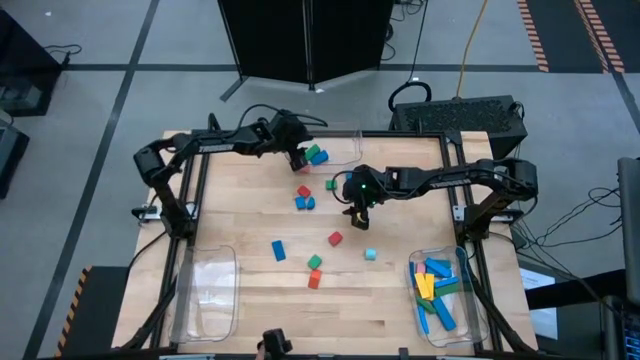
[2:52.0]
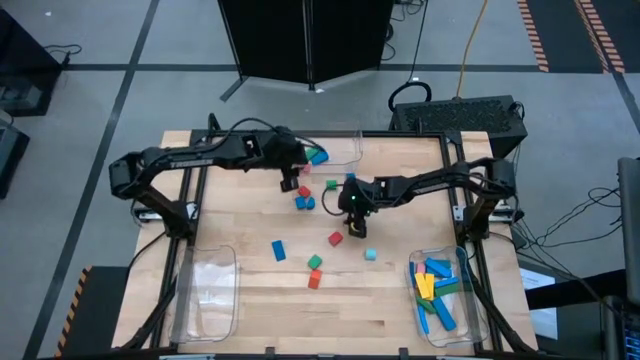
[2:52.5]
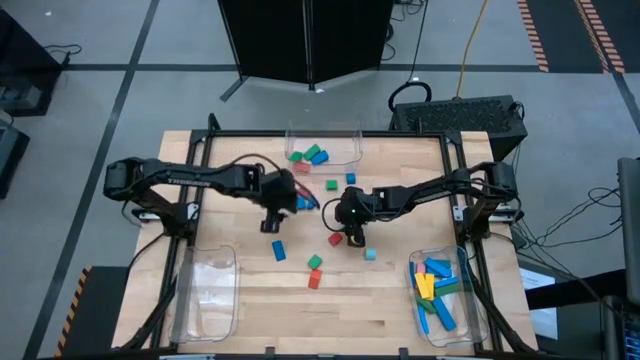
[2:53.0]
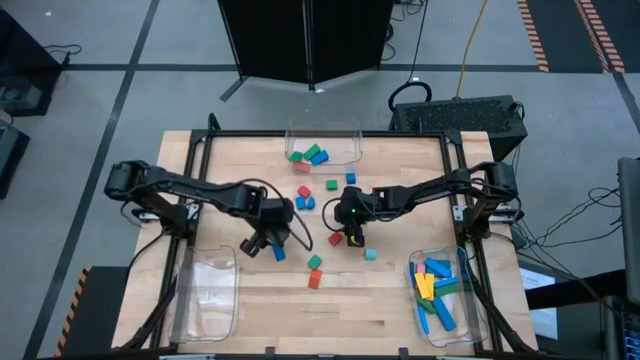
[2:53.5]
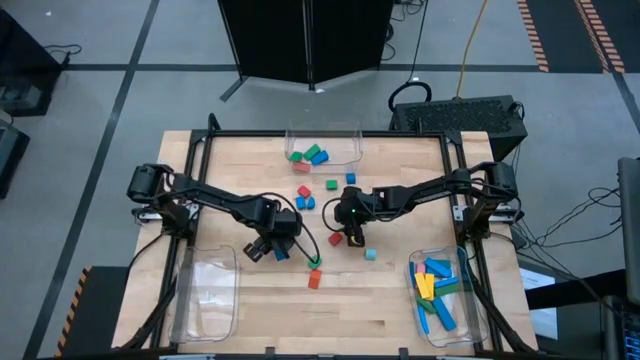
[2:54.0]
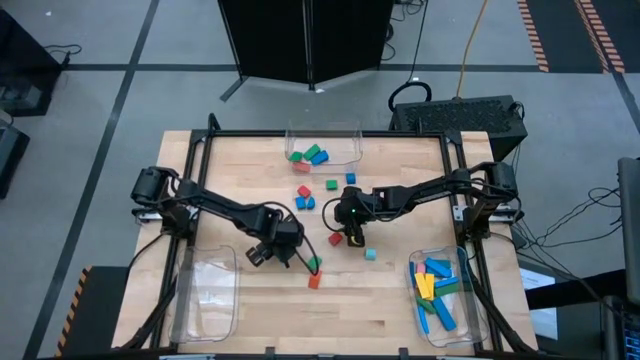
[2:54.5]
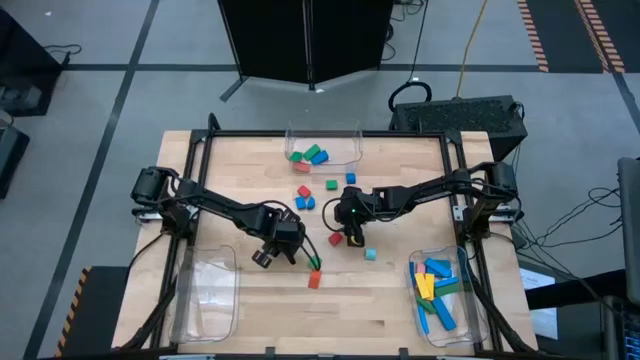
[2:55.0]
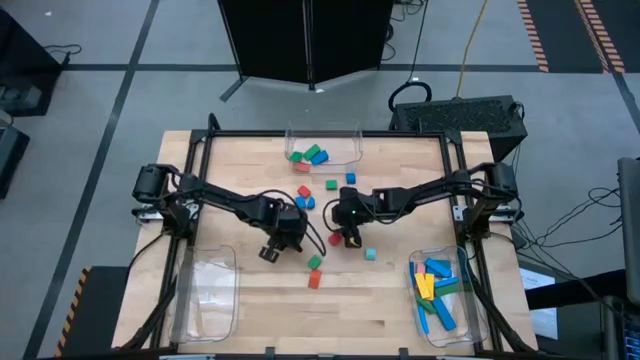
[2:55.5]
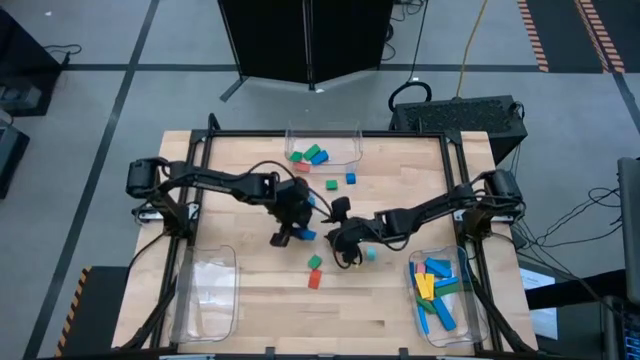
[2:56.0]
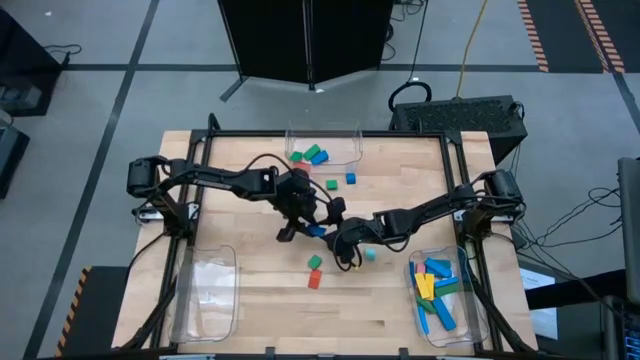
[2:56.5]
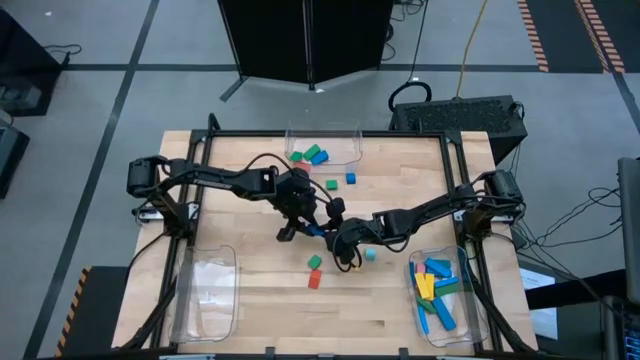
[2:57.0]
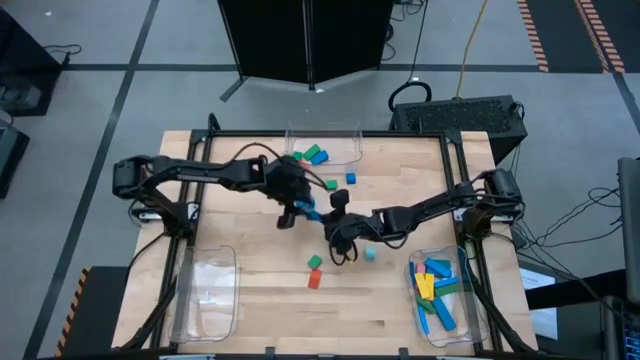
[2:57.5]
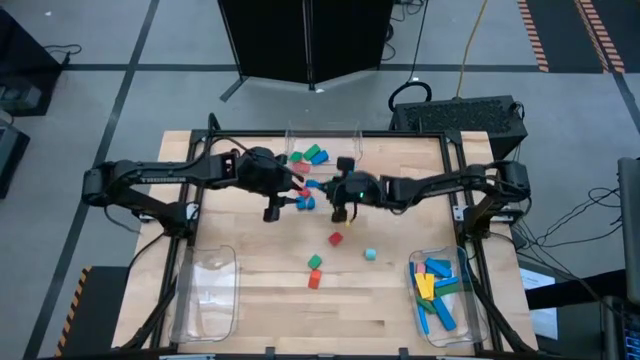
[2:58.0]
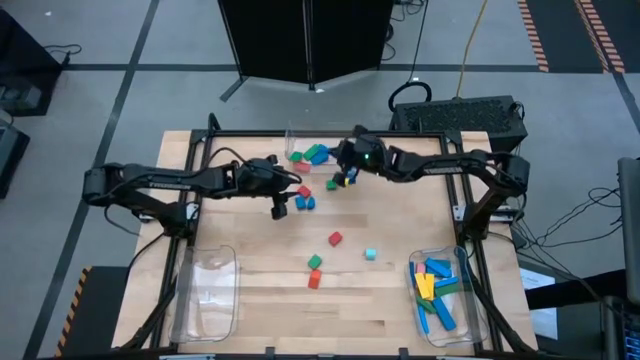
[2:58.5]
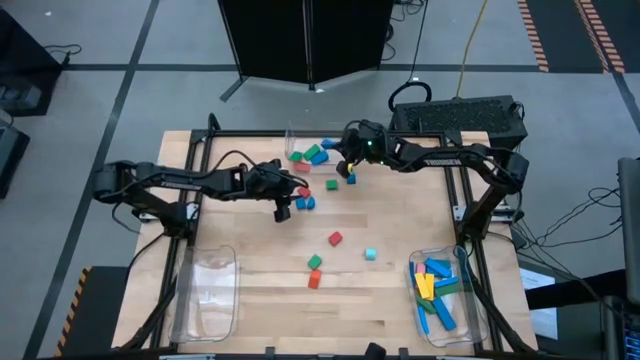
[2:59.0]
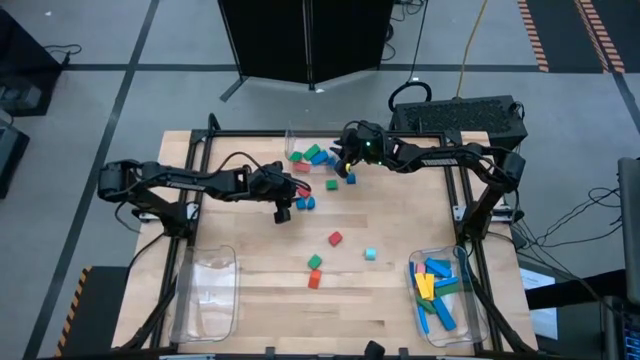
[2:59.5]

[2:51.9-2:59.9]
Task: Sort blocks by size
Put the dark blue triangle block into the top transparent bin

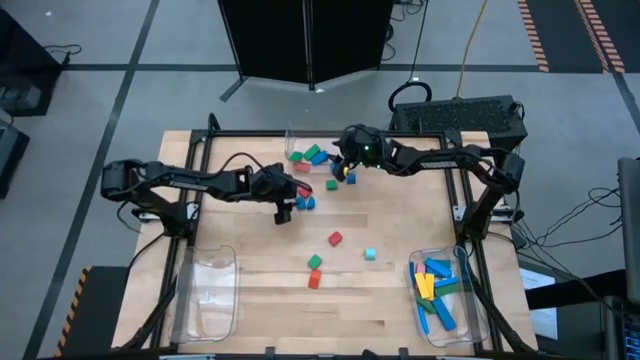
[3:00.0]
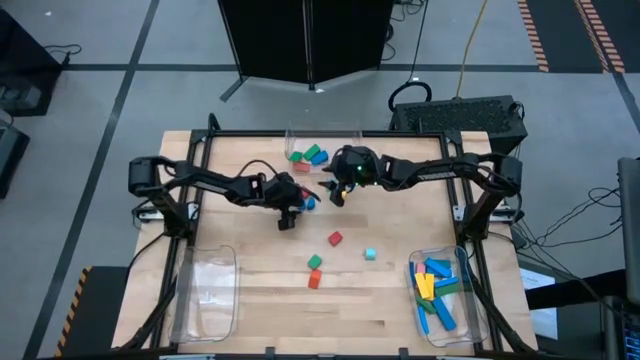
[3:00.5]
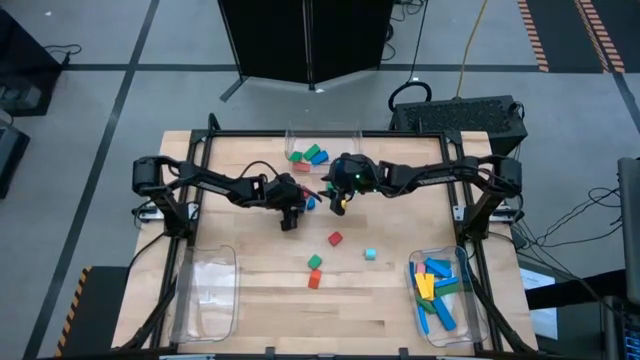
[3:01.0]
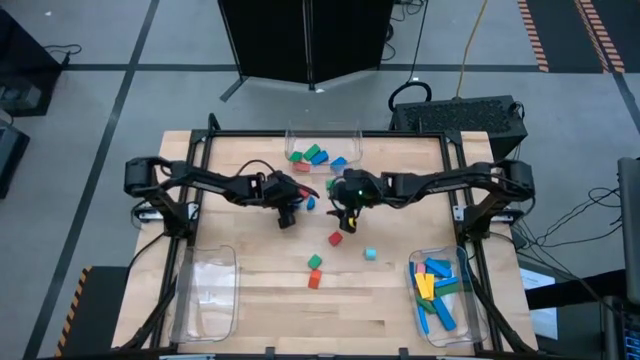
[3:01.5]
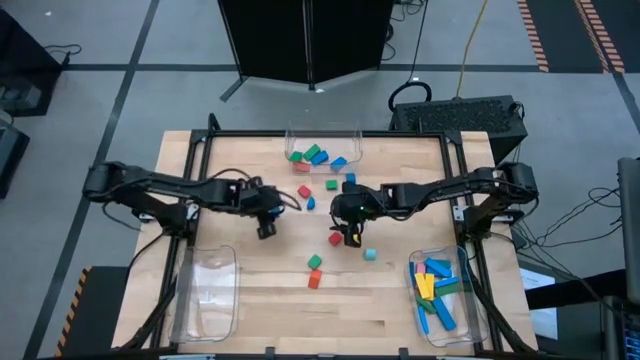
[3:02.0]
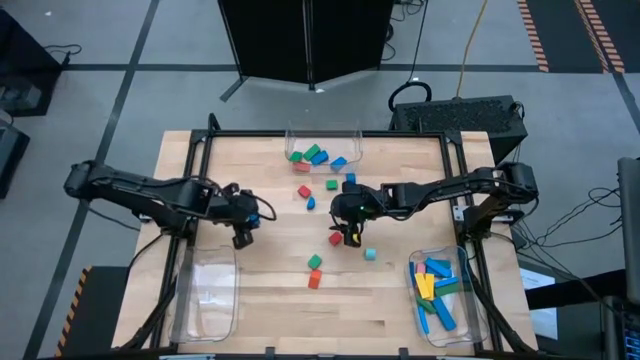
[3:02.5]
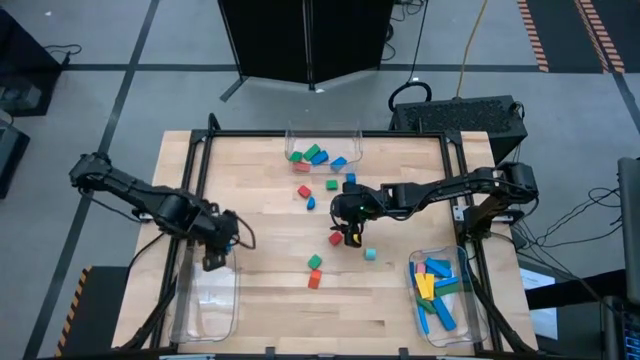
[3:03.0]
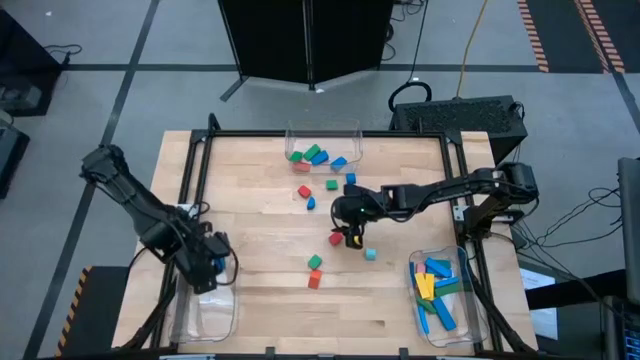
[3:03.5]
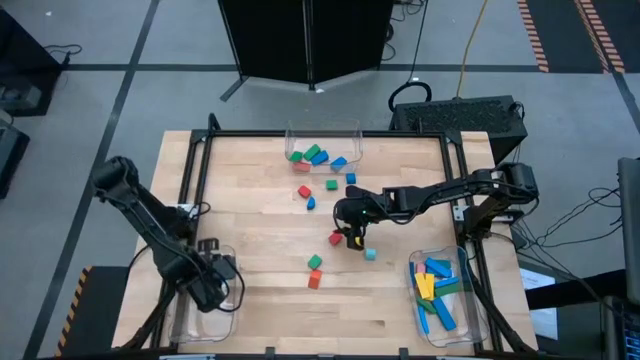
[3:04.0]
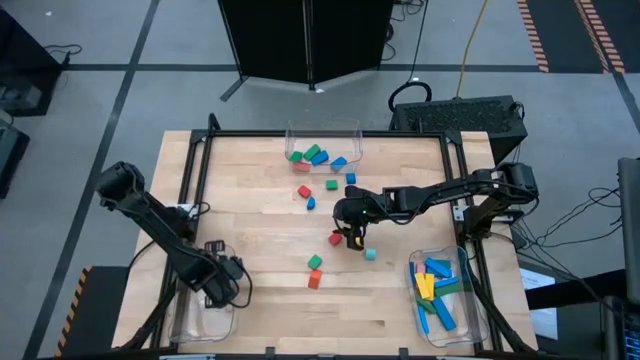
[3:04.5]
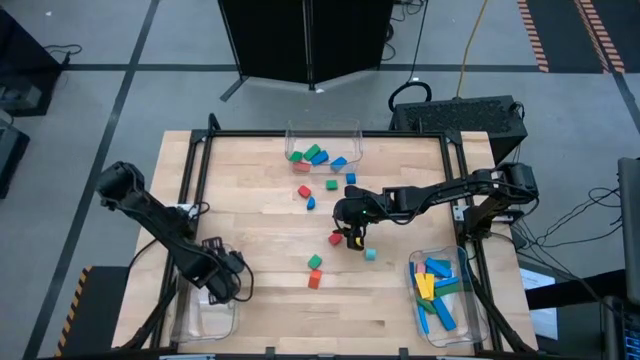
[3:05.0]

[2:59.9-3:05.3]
Put the dark blue half circle block into the bottom left transparent bin

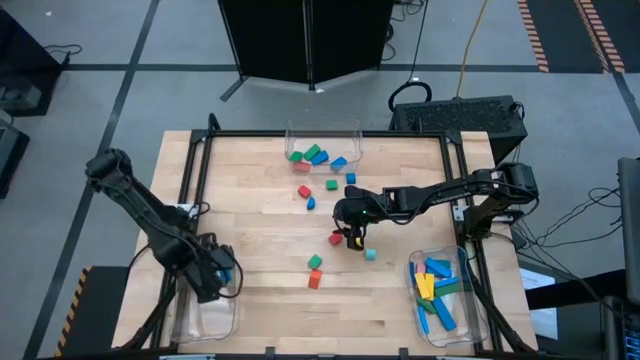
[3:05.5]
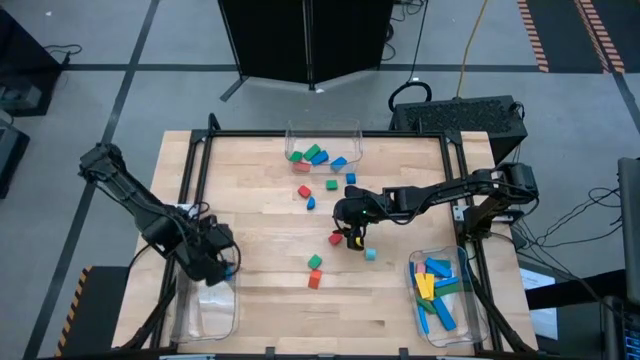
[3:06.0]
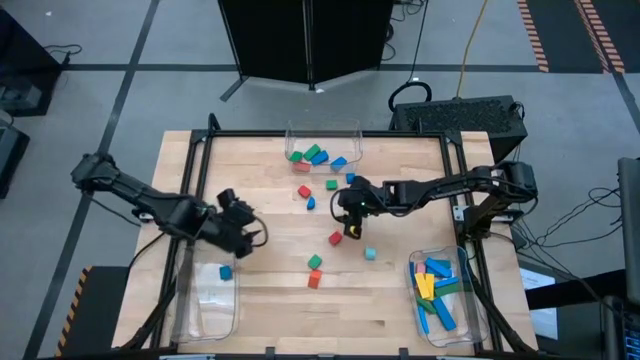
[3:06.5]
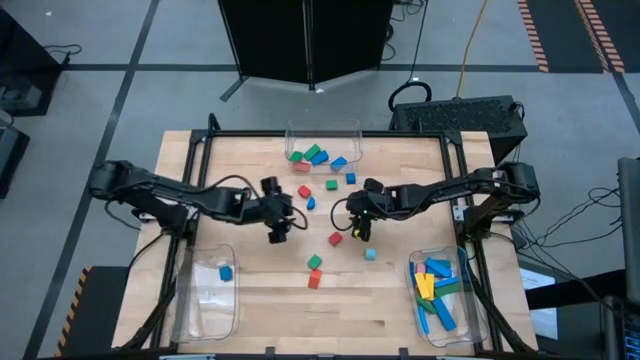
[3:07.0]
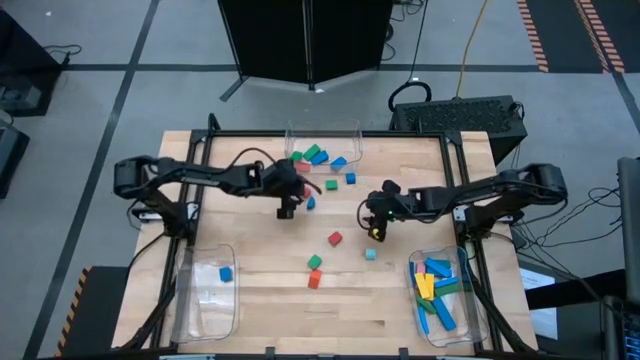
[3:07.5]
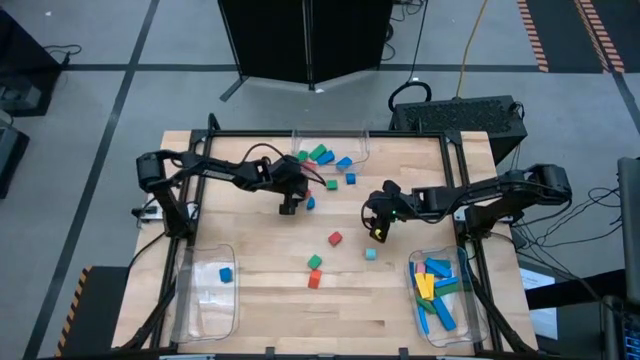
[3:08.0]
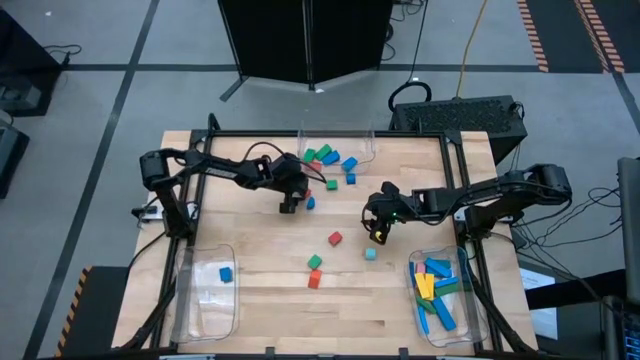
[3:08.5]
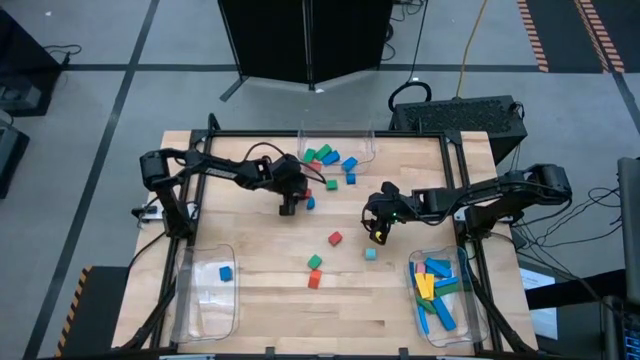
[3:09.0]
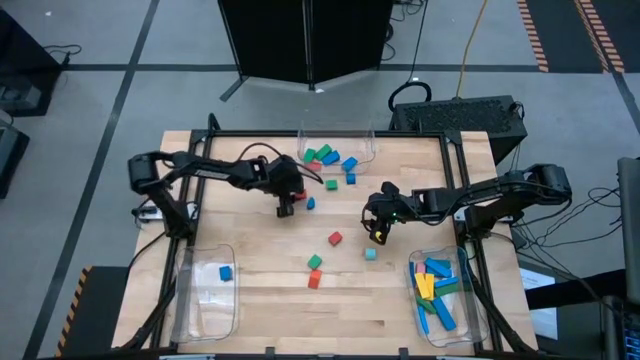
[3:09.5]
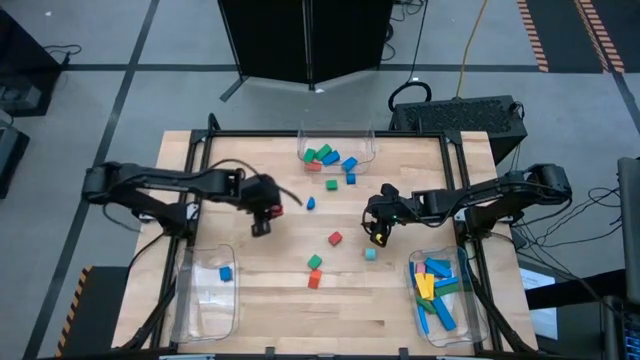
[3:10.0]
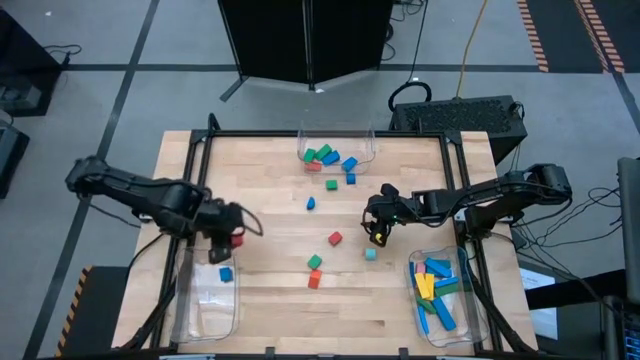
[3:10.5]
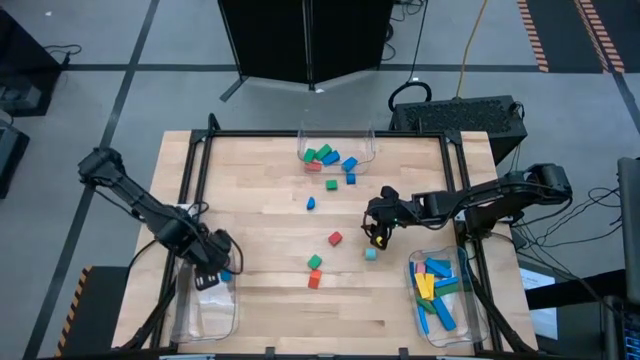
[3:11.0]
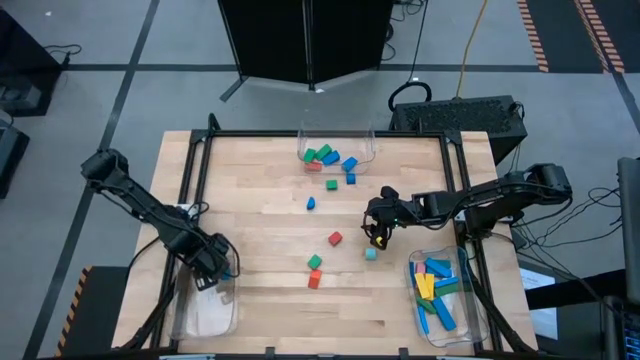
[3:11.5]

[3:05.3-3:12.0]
Put the red half circle block into the bottom left transparent bin

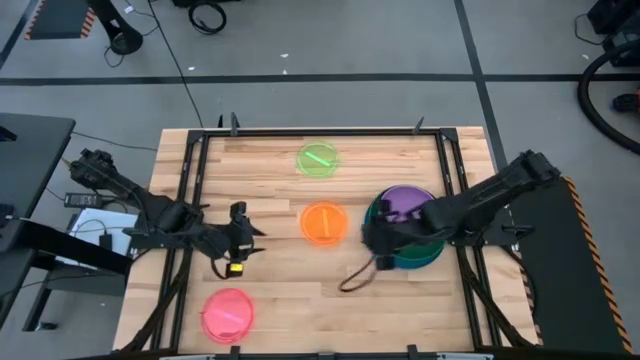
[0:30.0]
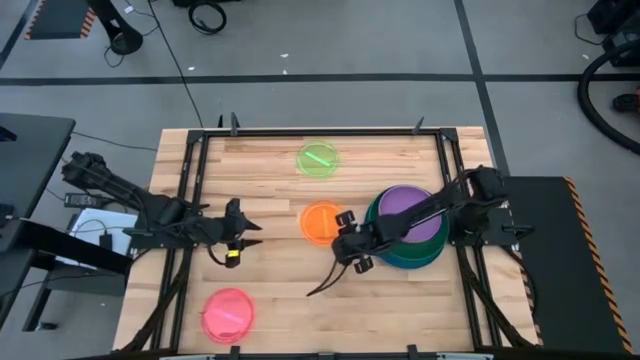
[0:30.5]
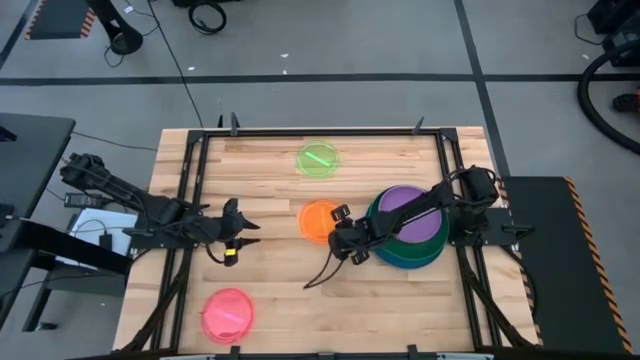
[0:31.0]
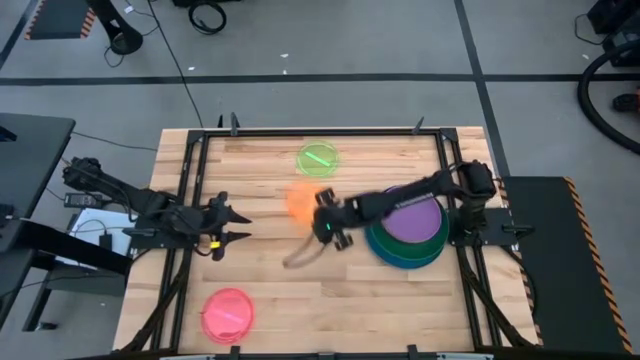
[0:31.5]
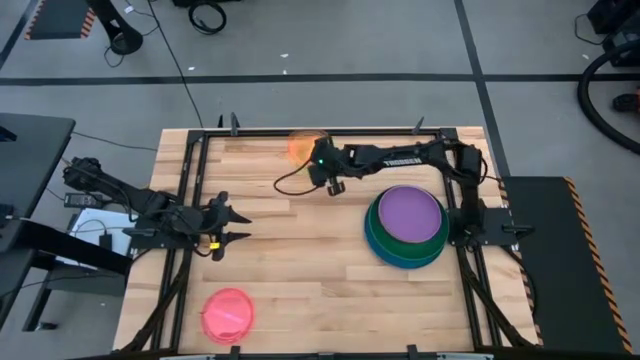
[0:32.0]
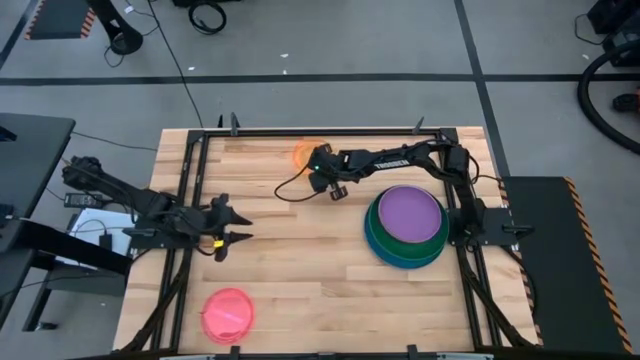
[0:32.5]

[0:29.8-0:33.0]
Task: Stack plastic plates
Stack the light orange plate on top of the green plate

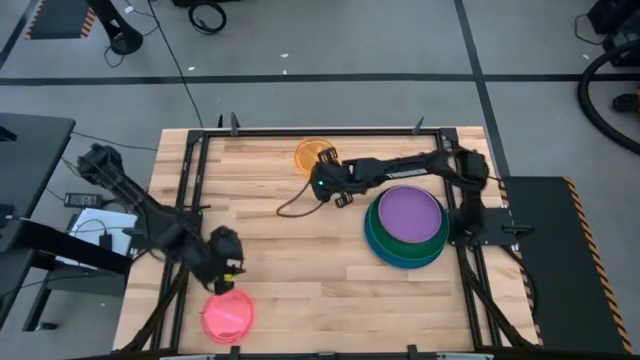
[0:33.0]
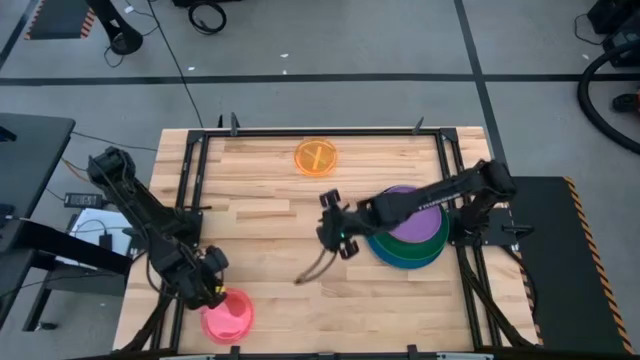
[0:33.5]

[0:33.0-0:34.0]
Stack the pink plate on top of the light orange plate
